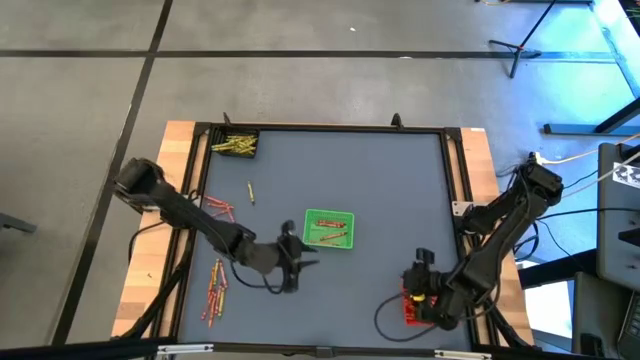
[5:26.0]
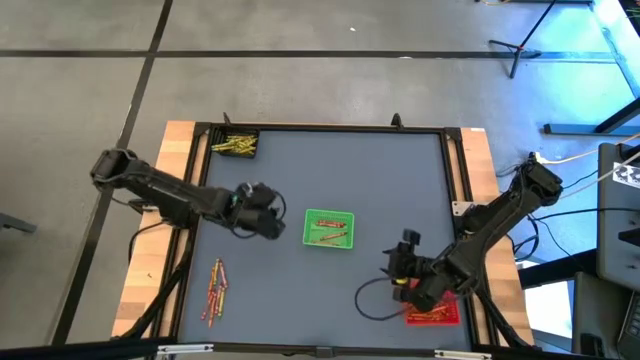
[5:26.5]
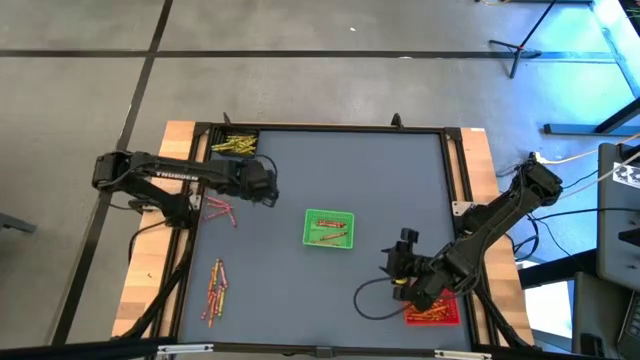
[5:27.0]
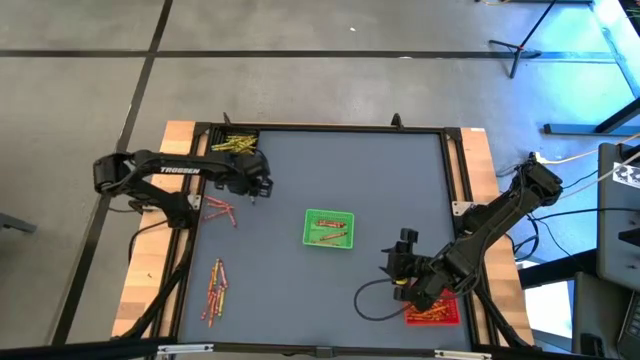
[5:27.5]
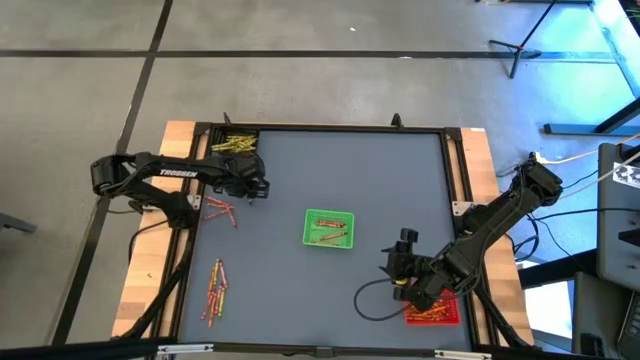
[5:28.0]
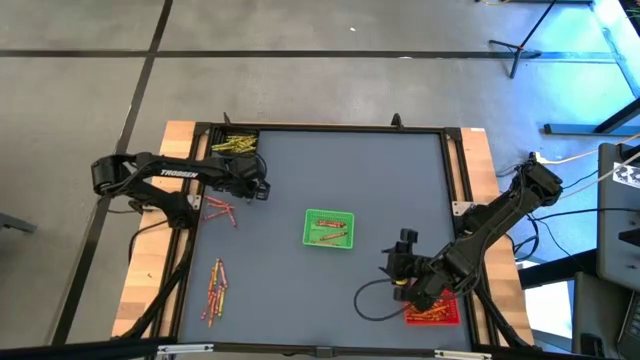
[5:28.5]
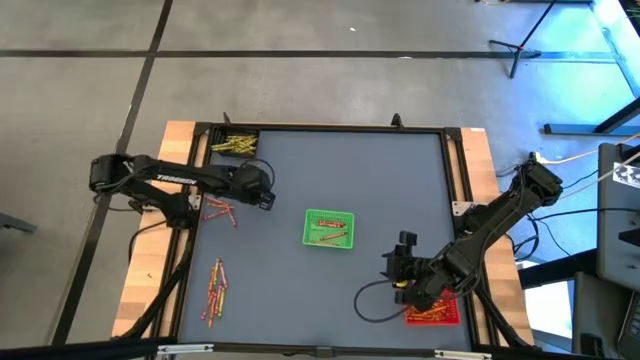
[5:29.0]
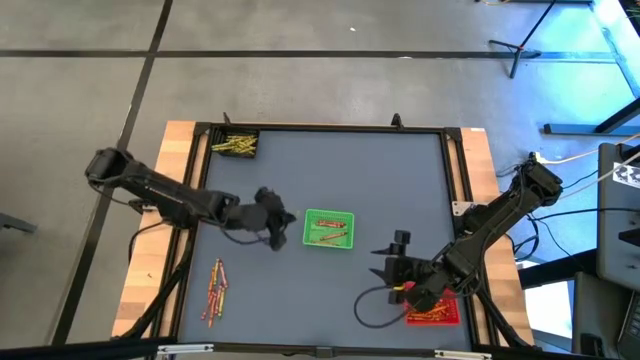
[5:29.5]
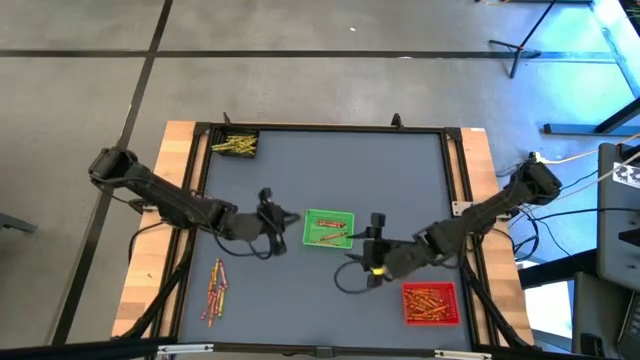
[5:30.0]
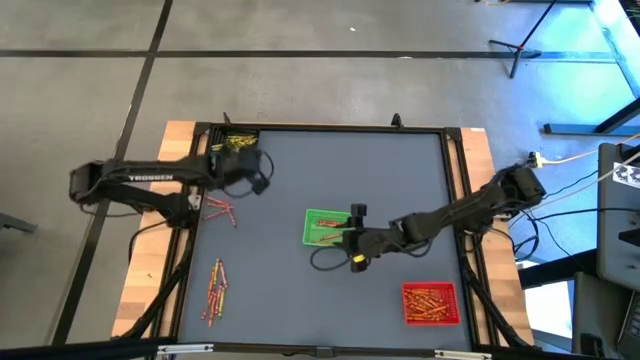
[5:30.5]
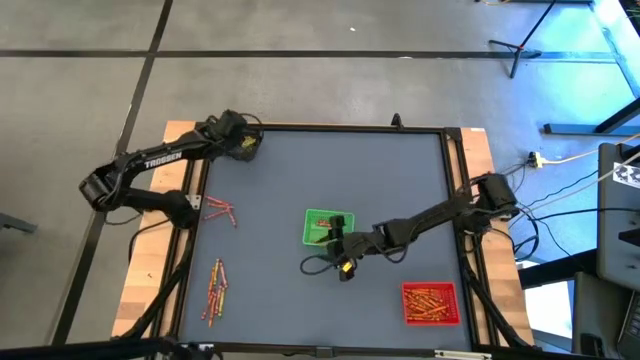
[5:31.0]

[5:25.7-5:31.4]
Task: Sort crayons
Put the green crayon into the black bin

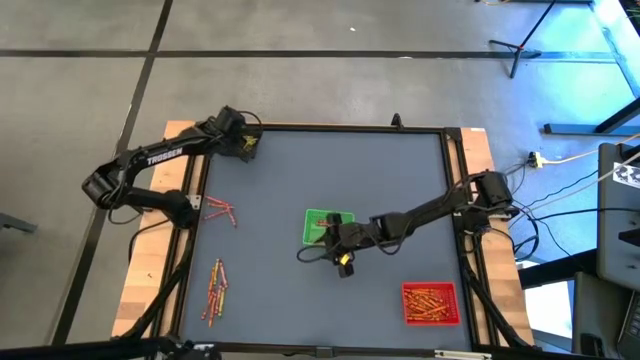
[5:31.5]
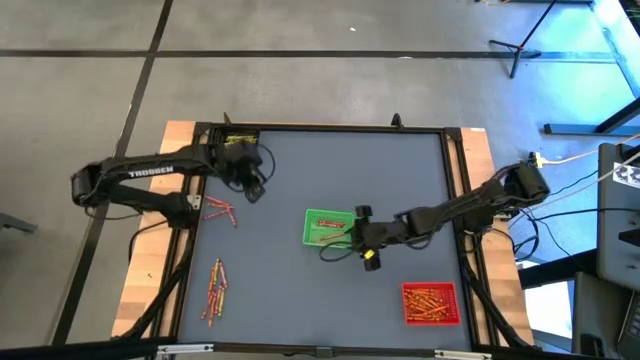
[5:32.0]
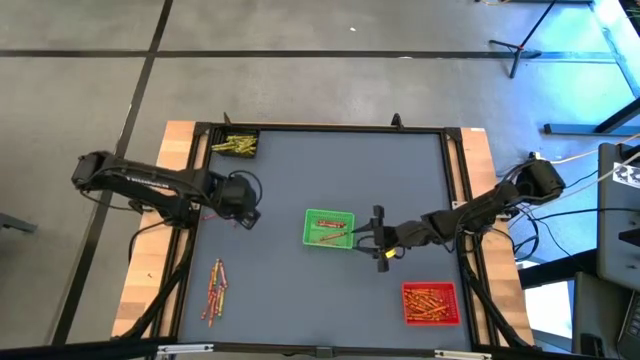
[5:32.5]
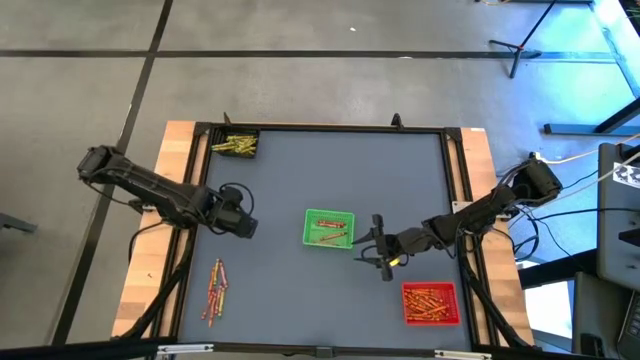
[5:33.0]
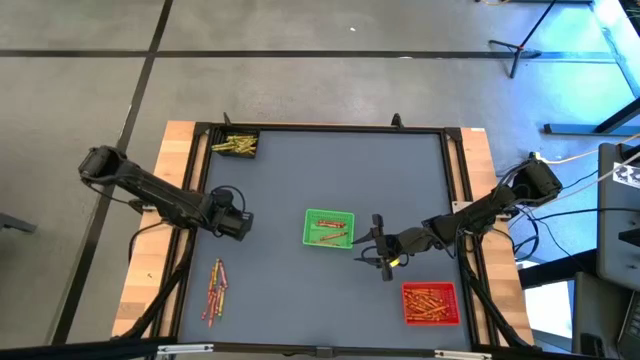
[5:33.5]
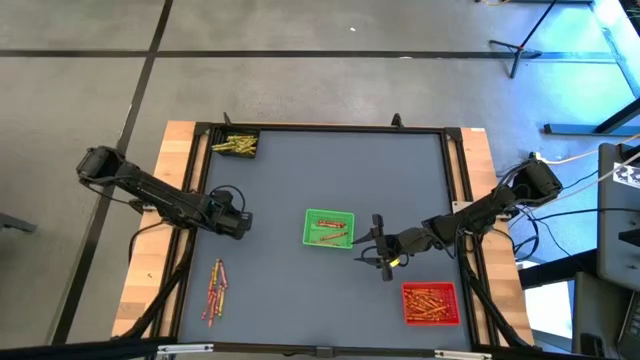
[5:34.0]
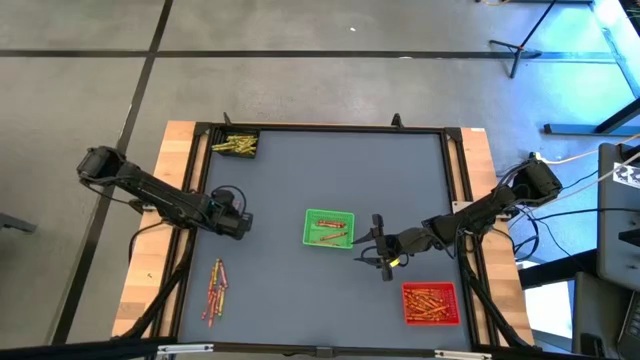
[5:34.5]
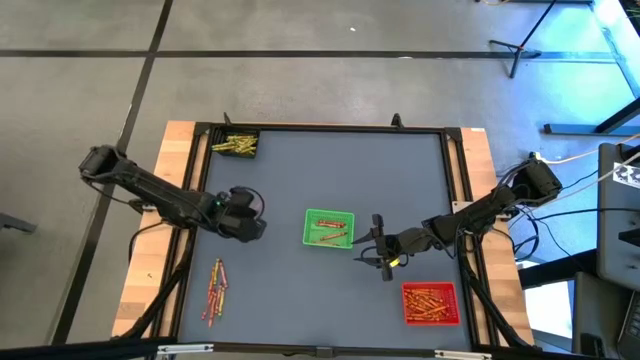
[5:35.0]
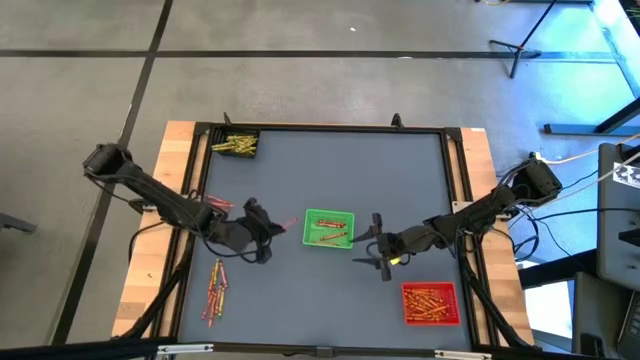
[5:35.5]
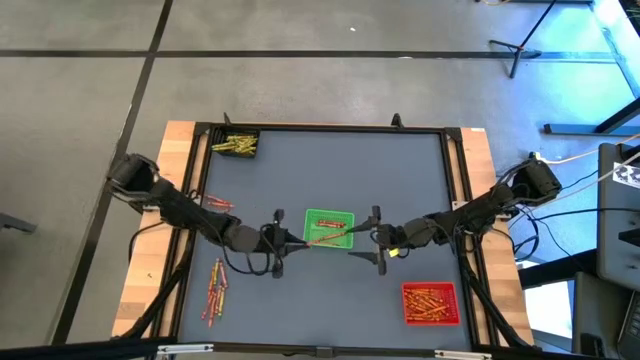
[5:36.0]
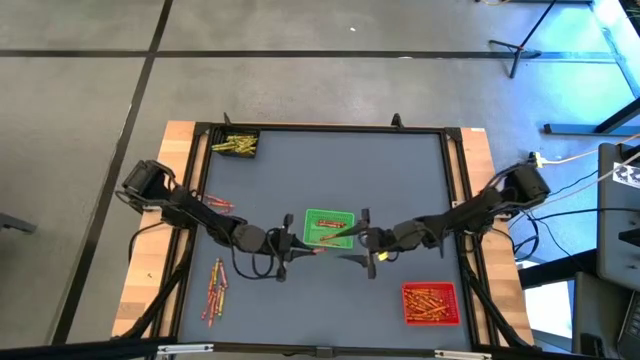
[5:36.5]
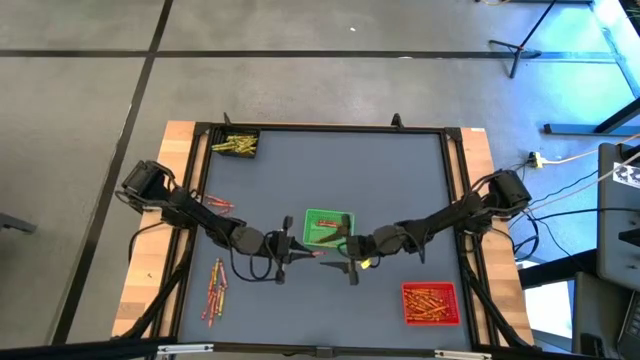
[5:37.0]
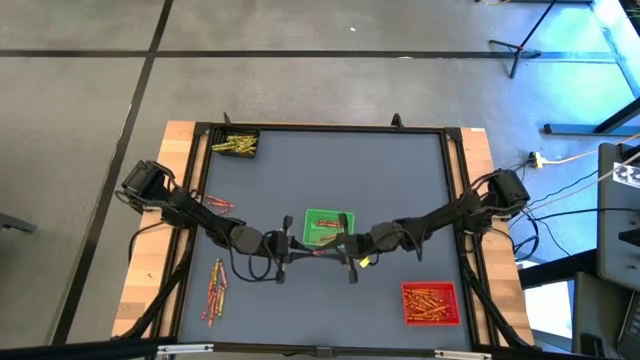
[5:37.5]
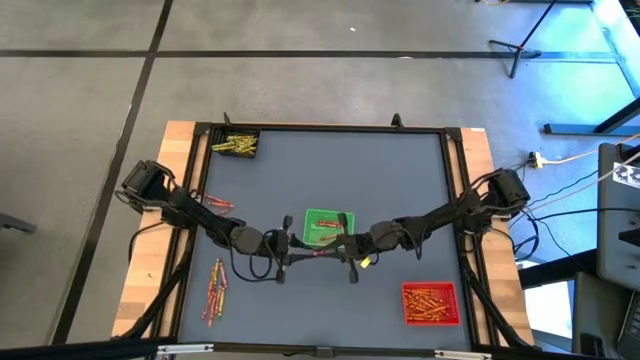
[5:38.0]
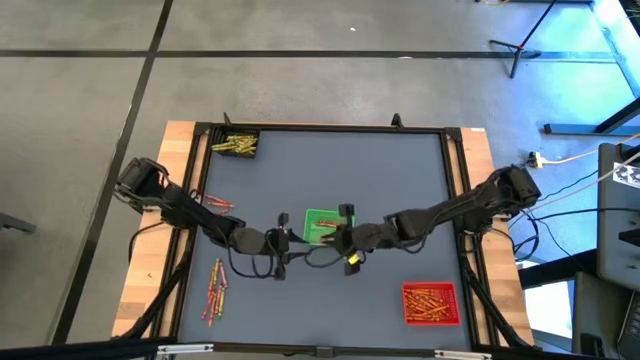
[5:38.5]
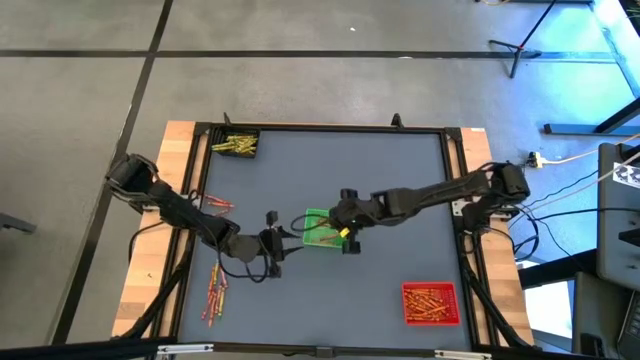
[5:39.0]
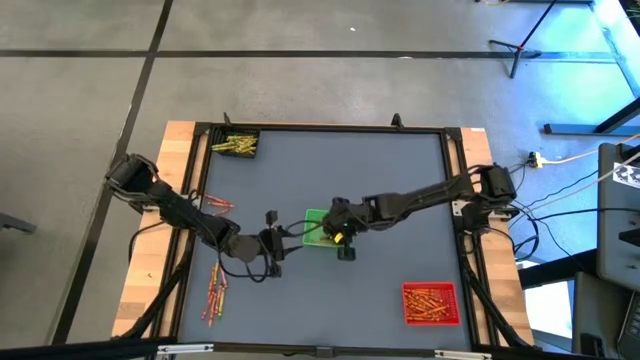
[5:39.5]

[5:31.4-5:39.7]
Put the red crayon into the green bin

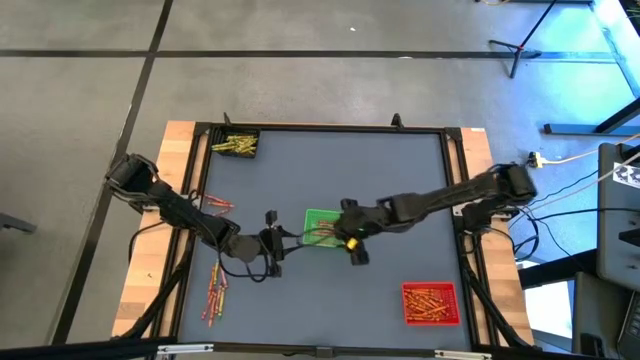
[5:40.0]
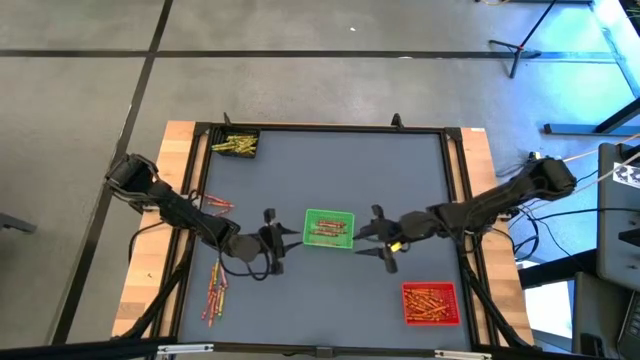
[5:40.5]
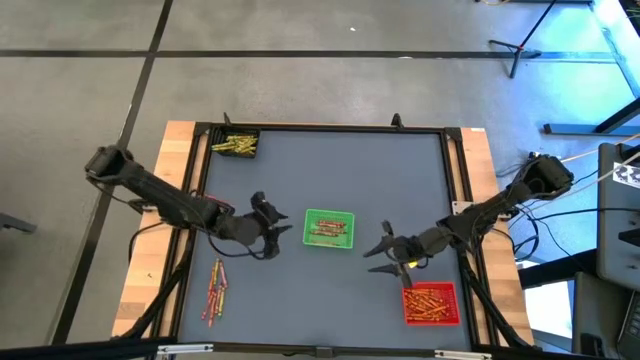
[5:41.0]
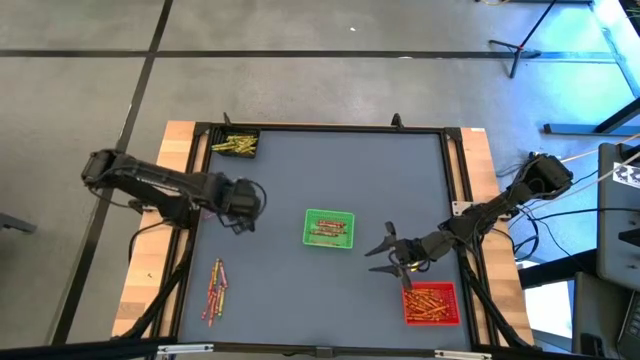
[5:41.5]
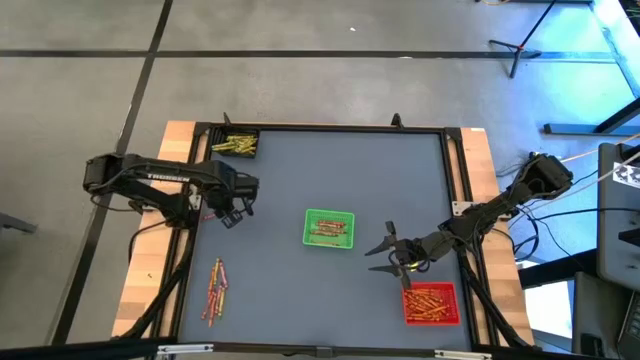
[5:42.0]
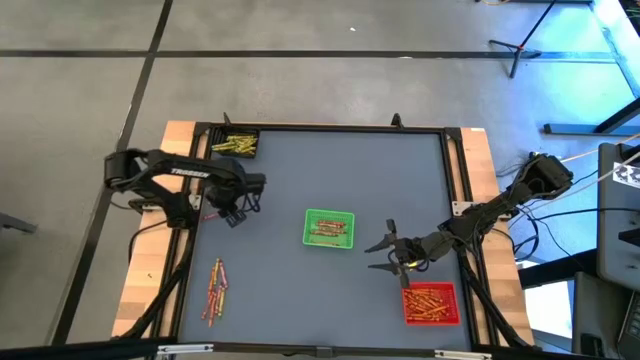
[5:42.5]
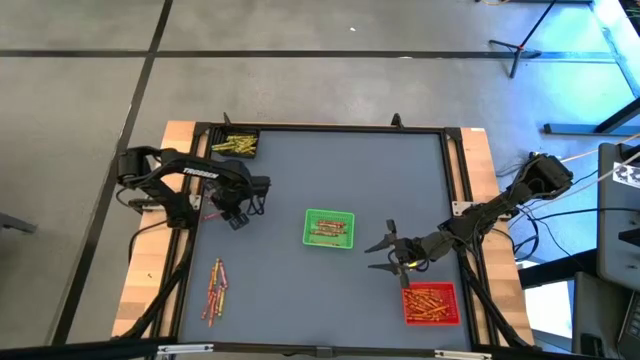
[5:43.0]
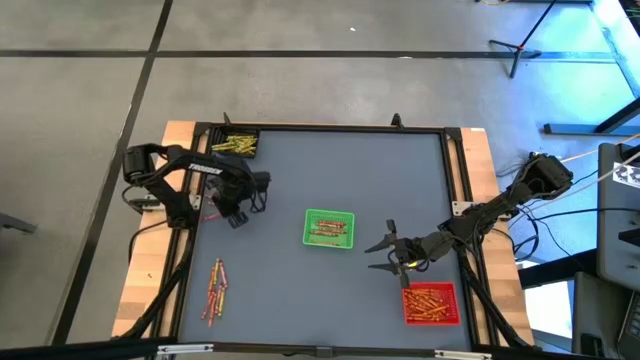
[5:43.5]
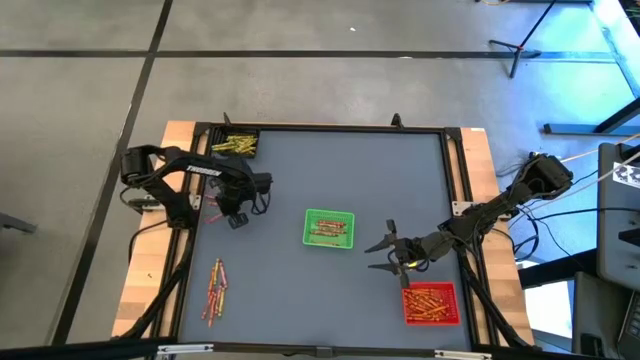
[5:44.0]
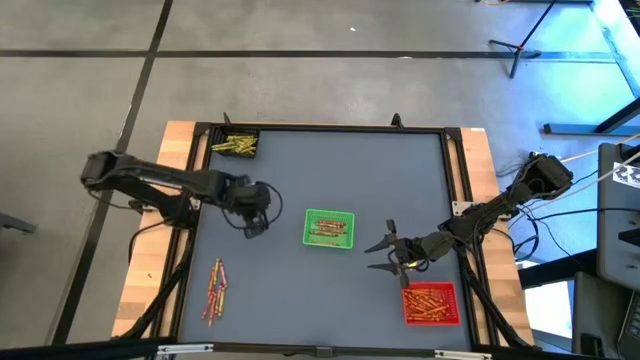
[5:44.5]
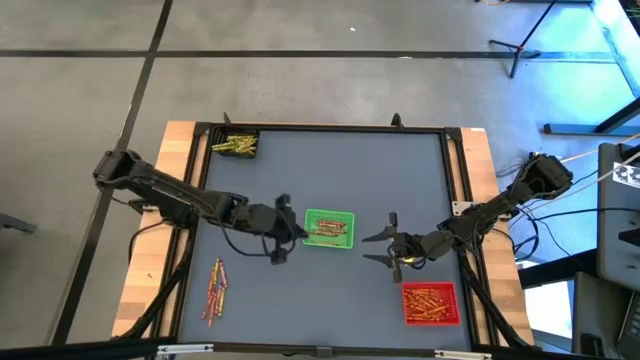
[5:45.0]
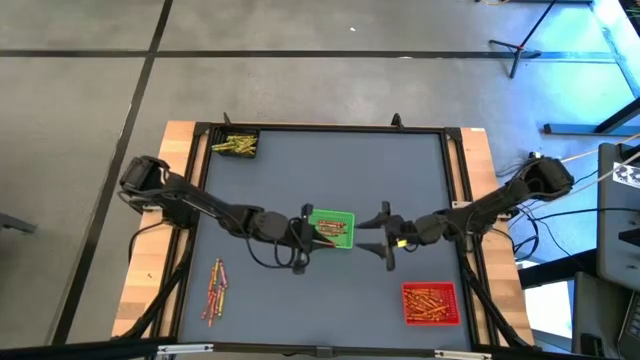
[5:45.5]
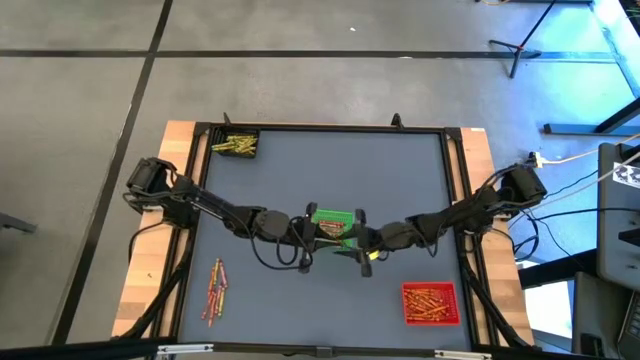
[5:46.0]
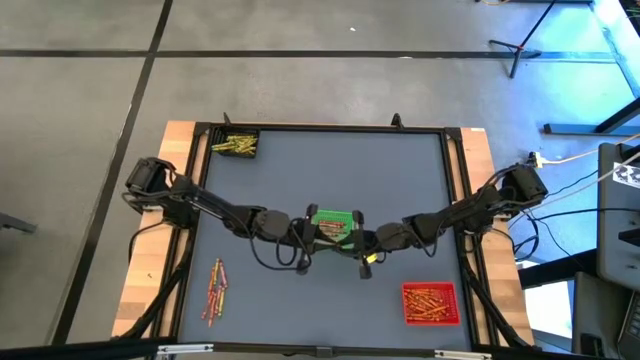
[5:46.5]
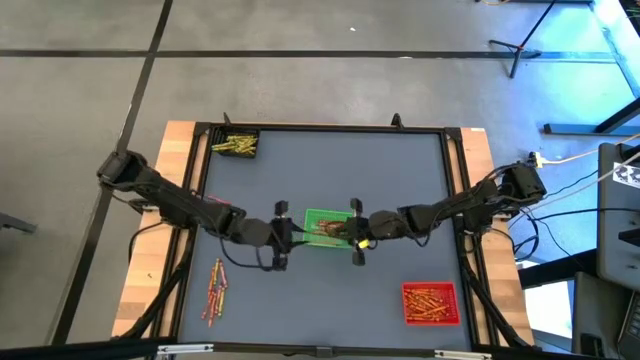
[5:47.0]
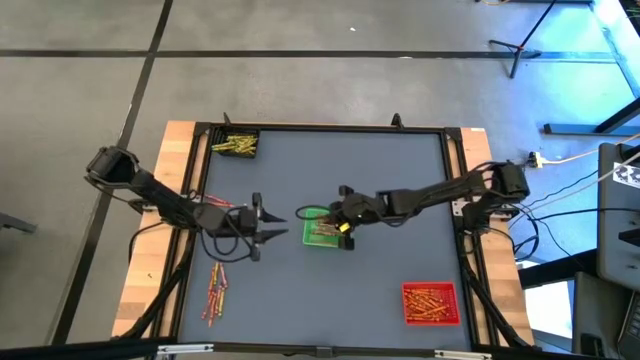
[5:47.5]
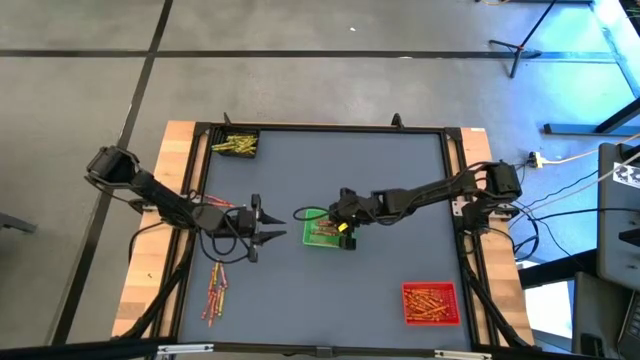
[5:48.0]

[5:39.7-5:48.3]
Put the red crayon into the green bin
